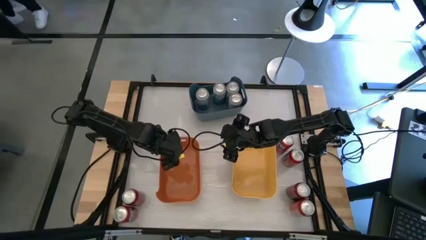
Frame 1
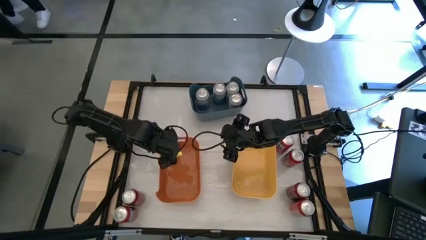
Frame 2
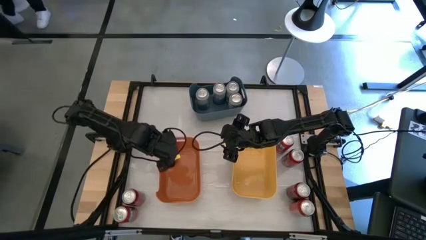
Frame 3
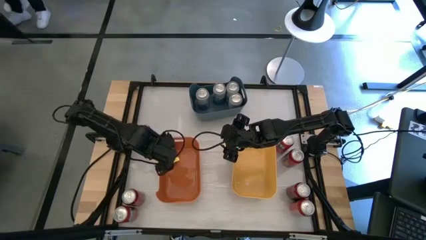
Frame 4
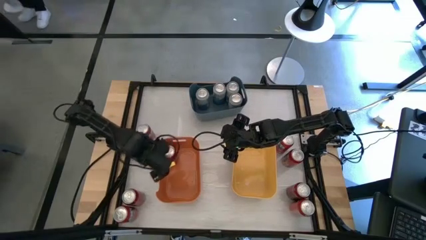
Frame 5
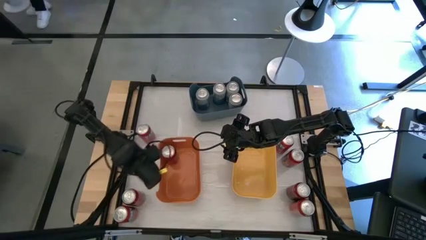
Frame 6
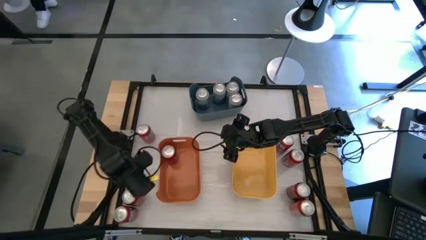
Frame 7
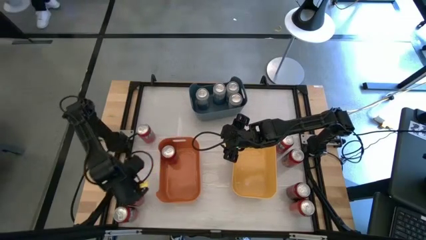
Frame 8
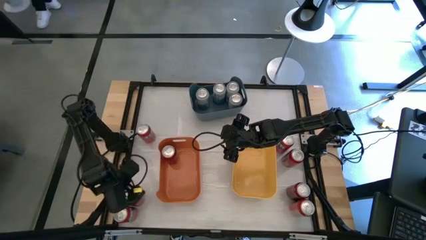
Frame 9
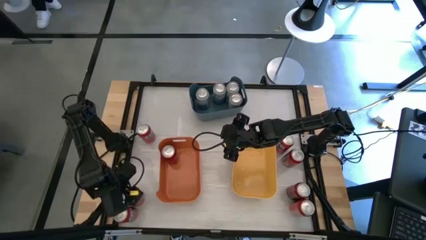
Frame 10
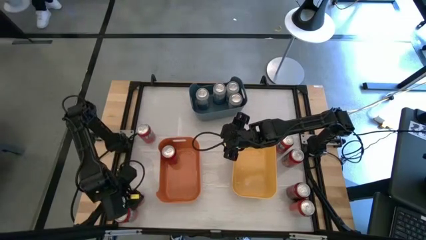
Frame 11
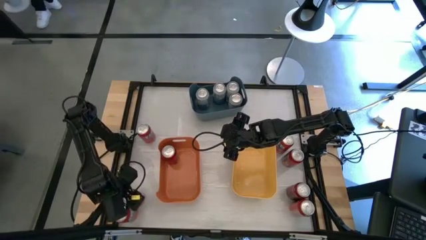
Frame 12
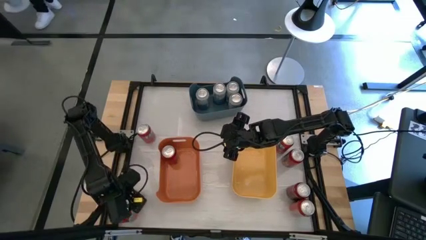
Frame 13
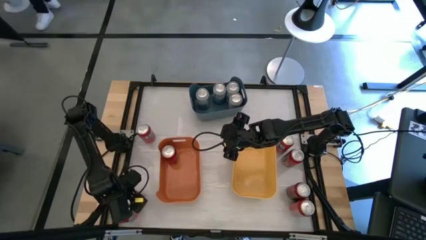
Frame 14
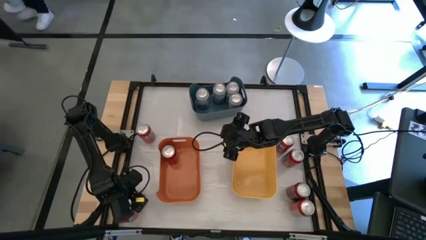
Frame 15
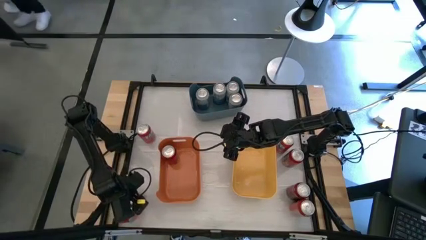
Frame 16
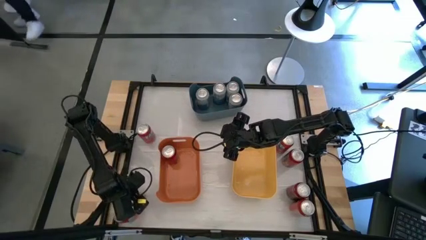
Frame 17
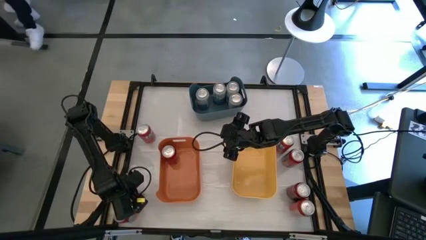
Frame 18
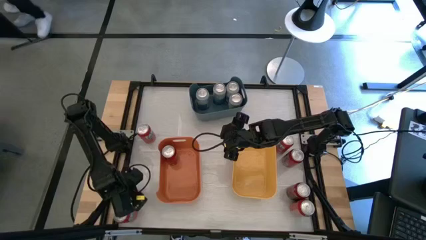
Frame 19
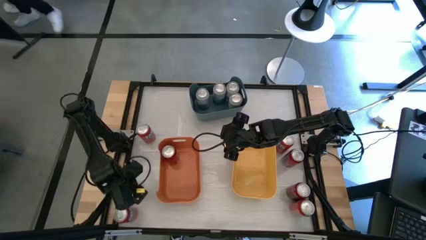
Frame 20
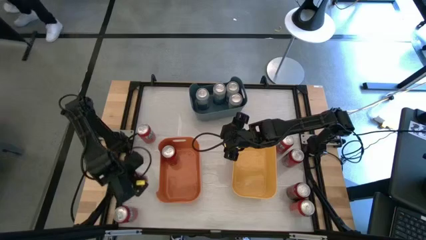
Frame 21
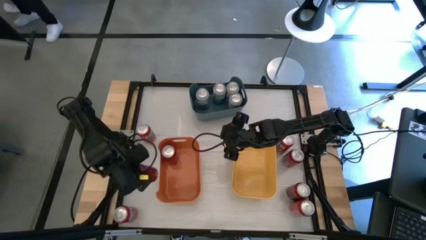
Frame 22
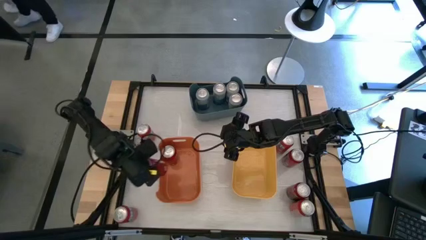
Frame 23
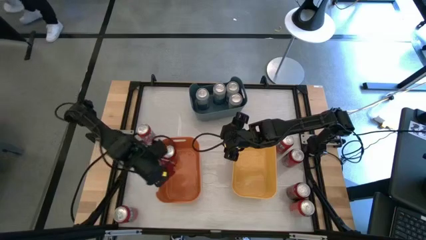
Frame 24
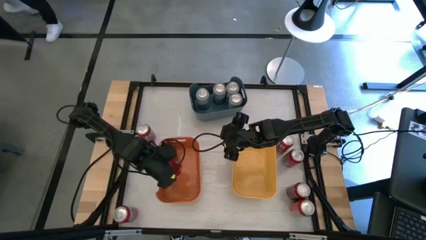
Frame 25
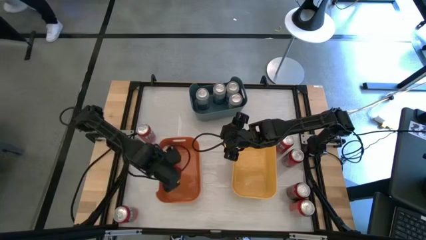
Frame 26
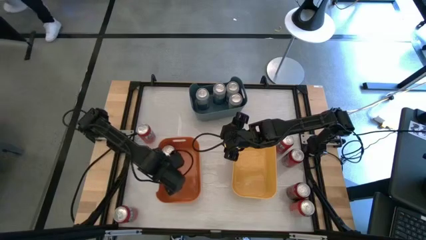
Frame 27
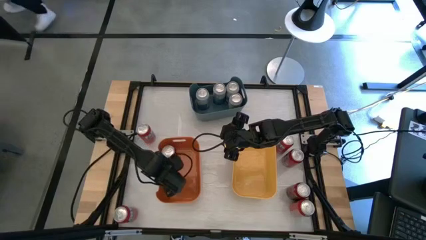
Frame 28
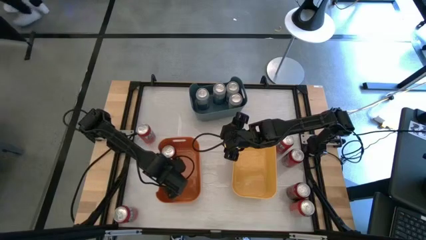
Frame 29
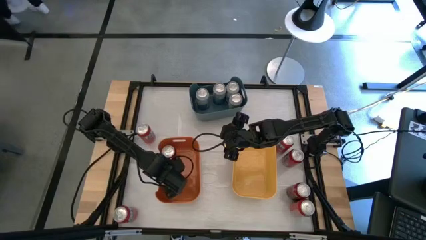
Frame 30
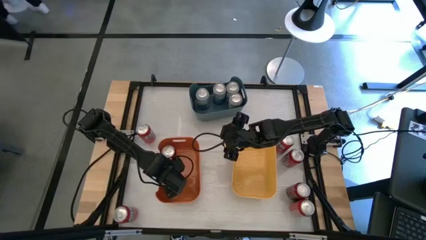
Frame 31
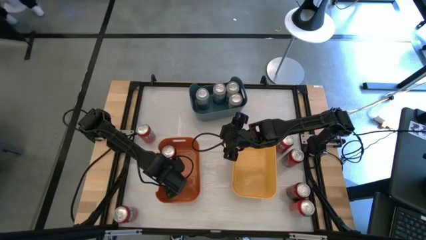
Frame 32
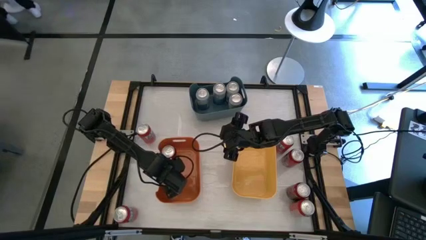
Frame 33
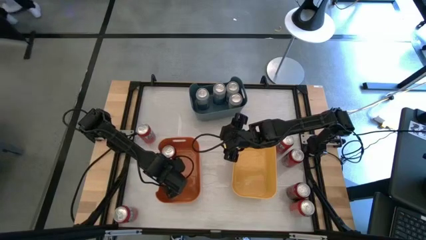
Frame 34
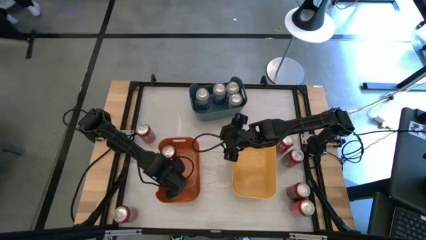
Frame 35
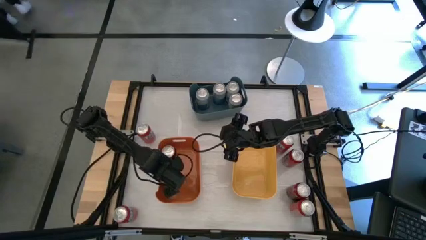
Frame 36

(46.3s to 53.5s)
Task: Sort soda cans
Put the bottom left red-black soda can into the orange bin

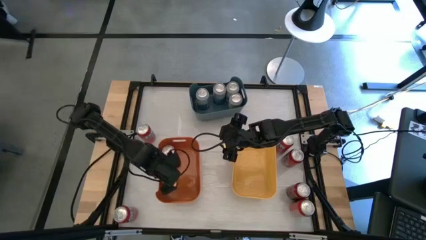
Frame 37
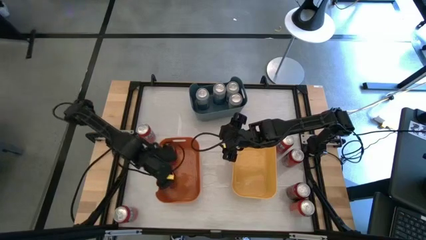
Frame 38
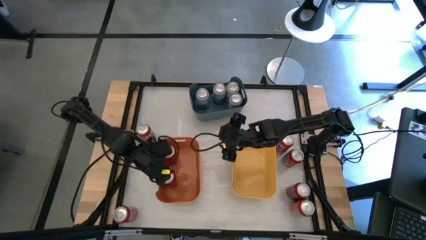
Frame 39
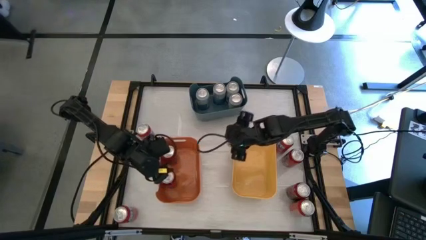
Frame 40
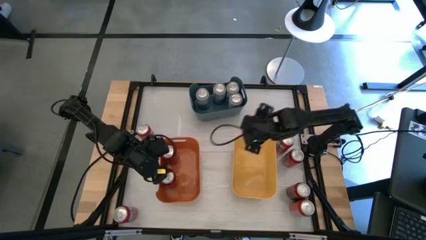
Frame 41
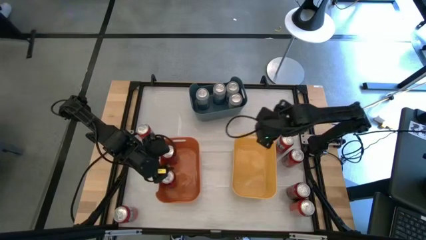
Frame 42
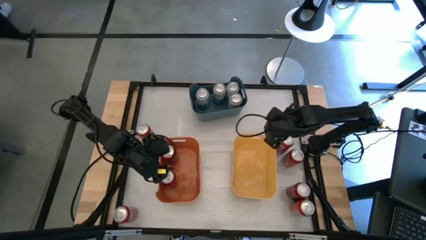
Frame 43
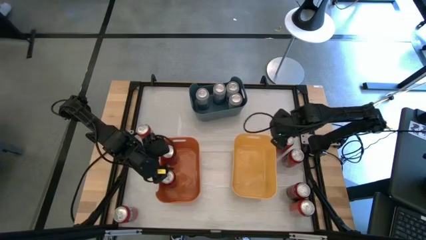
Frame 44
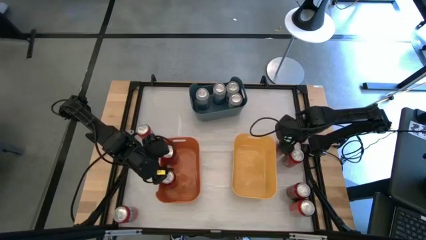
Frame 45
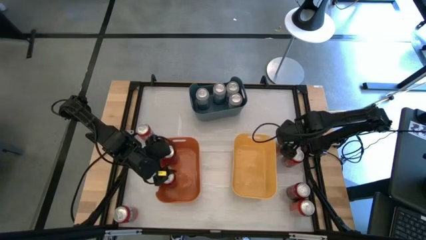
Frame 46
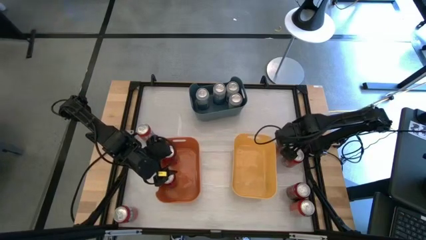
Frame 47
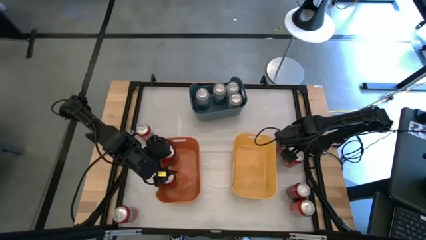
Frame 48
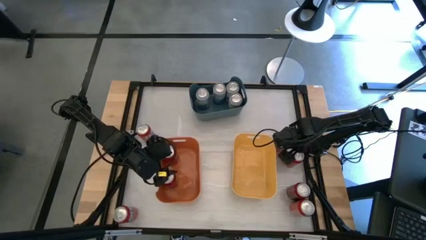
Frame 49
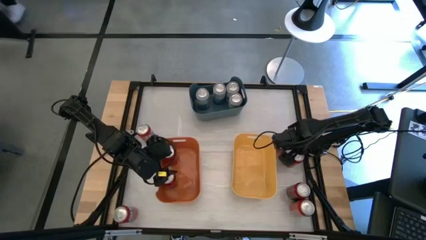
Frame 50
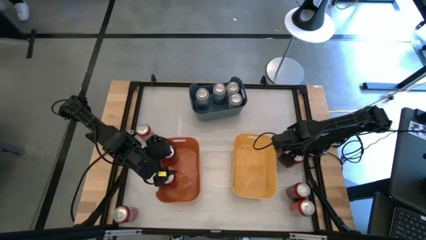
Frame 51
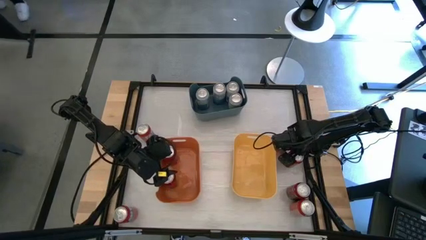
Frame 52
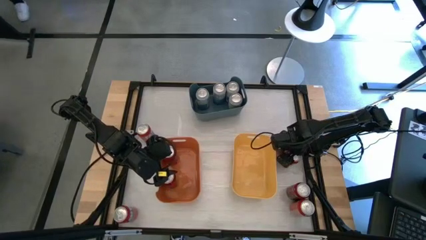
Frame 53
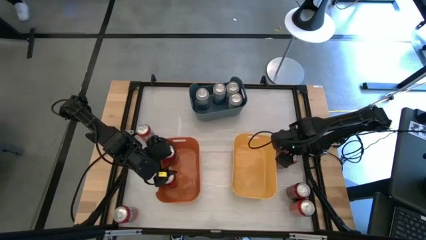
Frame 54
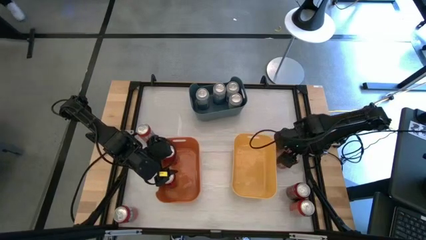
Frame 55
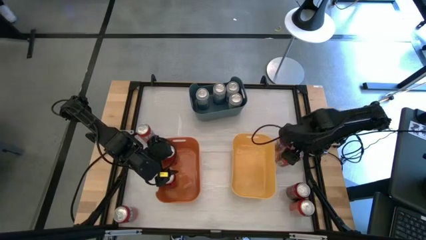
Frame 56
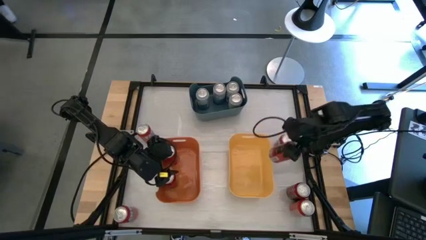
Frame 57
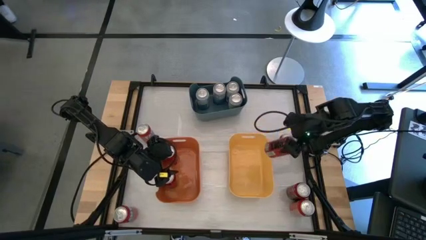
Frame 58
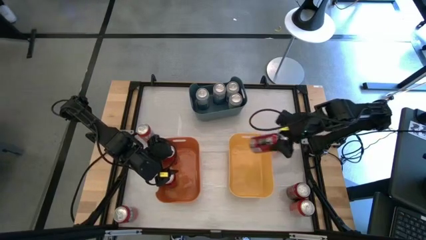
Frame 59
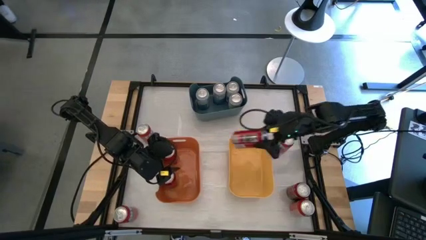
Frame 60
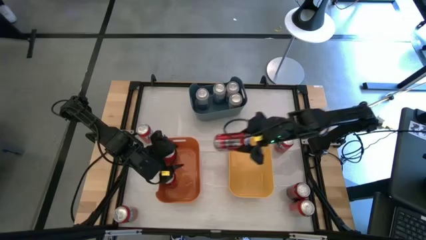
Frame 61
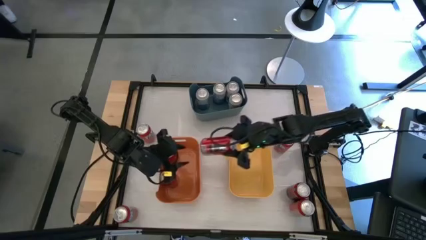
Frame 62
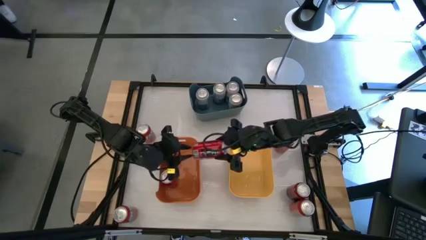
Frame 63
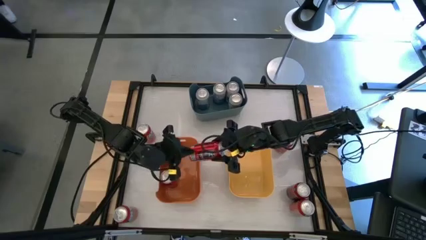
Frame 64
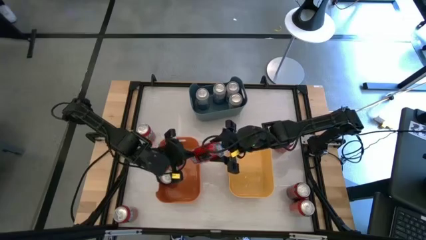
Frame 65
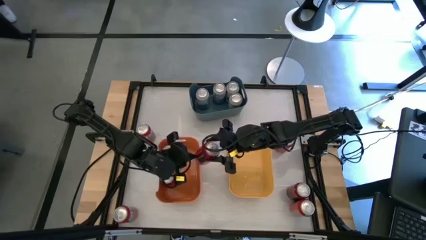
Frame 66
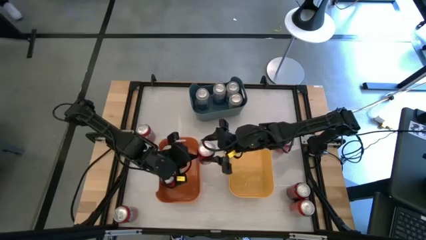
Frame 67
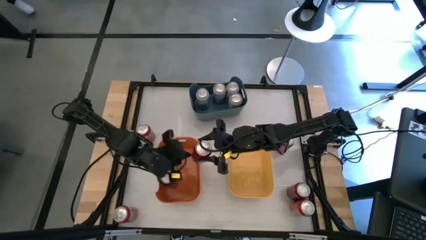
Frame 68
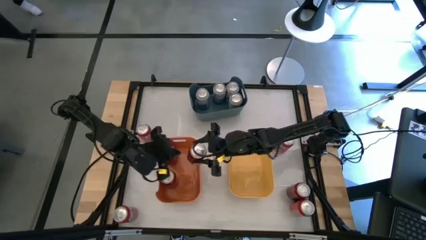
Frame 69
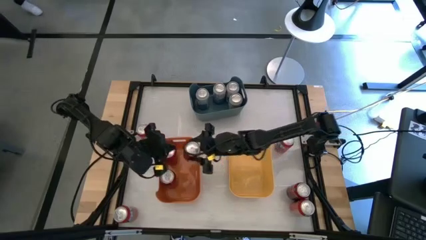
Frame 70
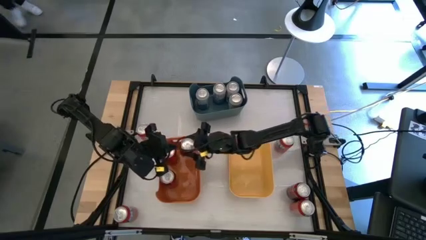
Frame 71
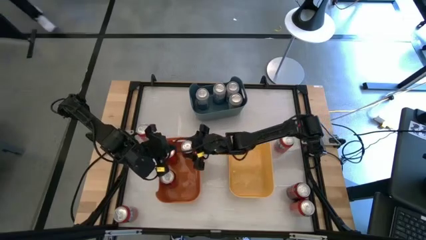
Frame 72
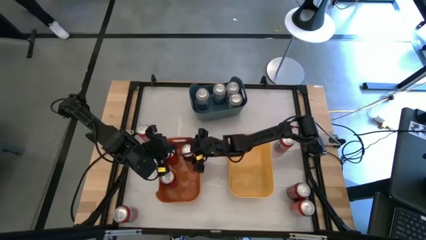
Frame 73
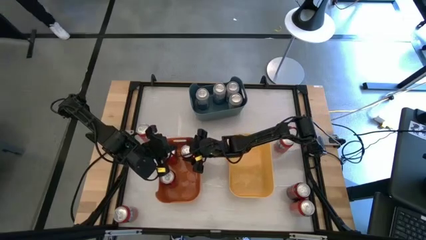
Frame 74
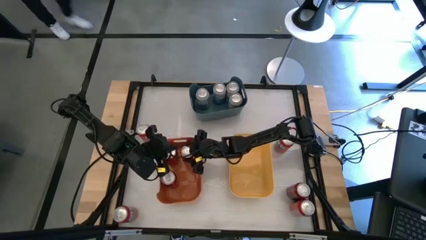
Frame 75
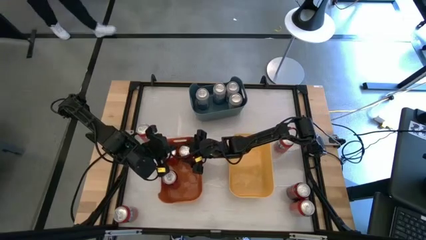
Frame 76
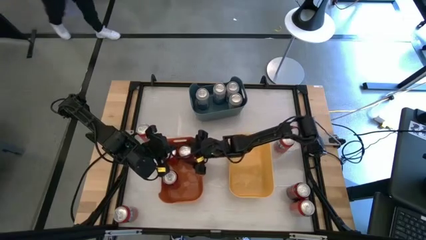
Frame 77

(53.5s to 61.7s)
Put the top red-black soda can into the orange bin
